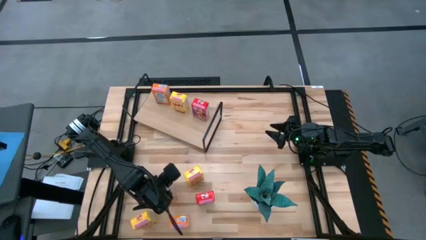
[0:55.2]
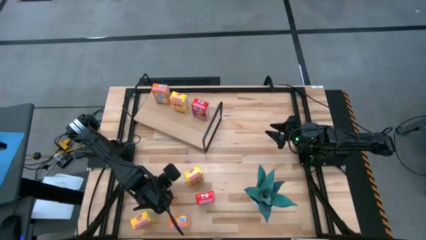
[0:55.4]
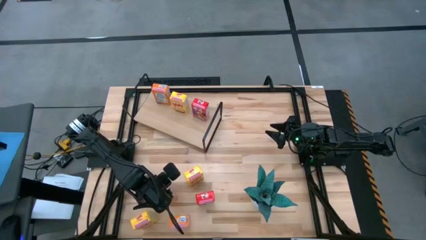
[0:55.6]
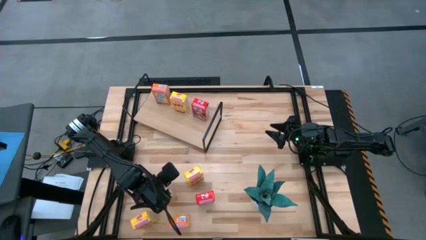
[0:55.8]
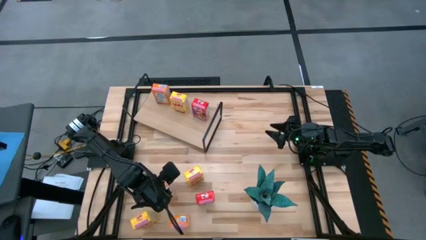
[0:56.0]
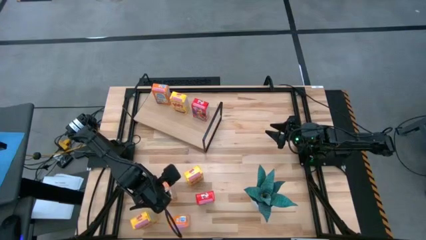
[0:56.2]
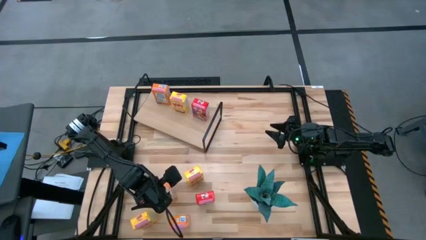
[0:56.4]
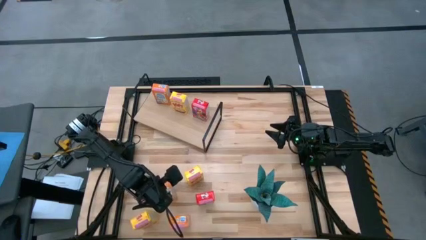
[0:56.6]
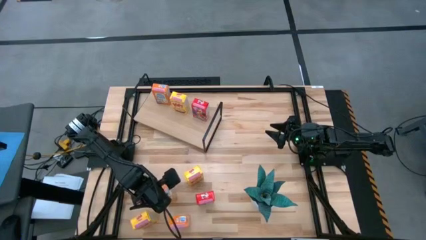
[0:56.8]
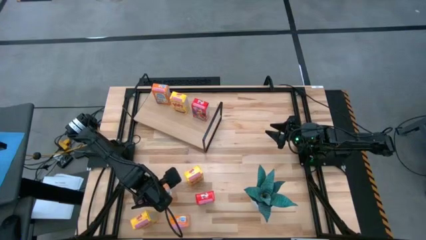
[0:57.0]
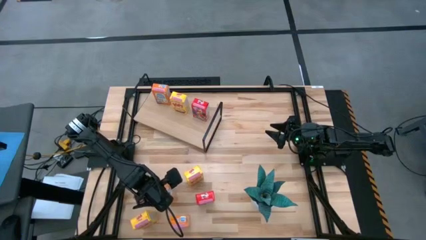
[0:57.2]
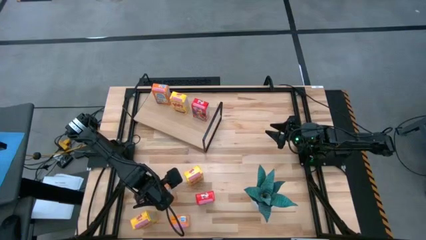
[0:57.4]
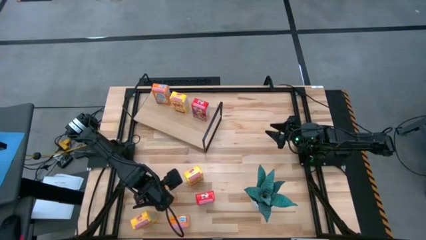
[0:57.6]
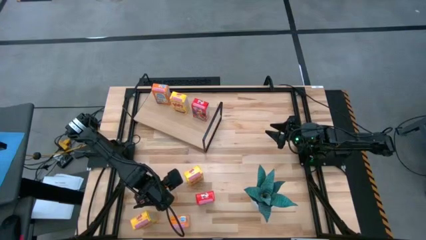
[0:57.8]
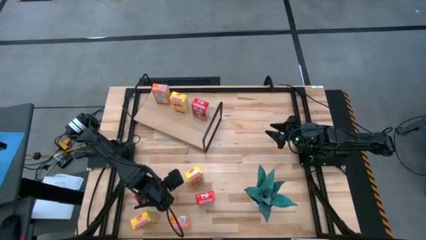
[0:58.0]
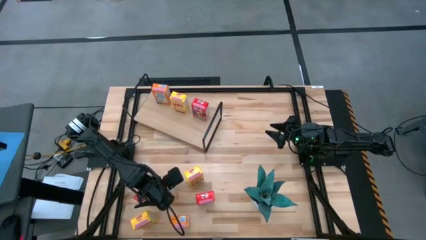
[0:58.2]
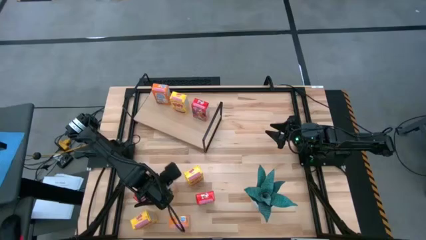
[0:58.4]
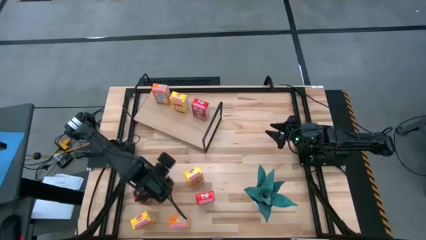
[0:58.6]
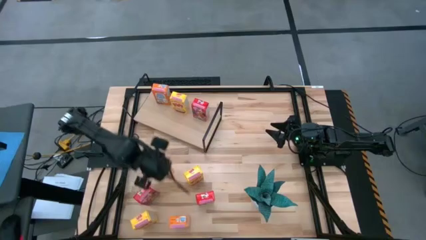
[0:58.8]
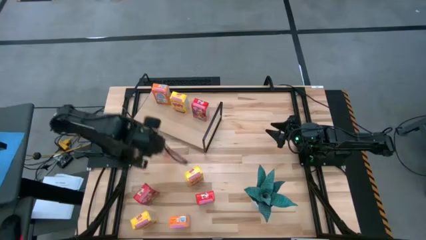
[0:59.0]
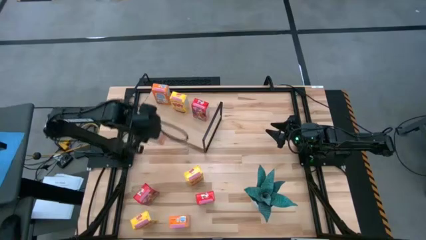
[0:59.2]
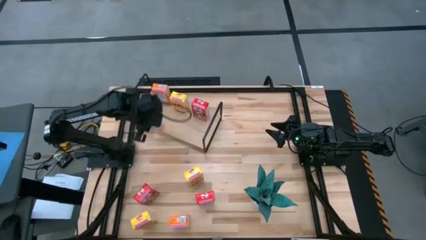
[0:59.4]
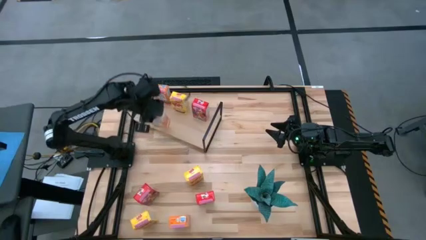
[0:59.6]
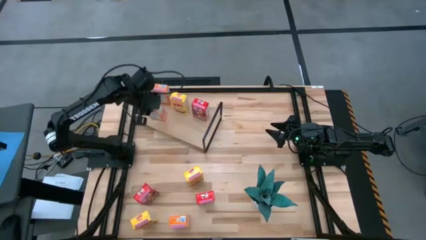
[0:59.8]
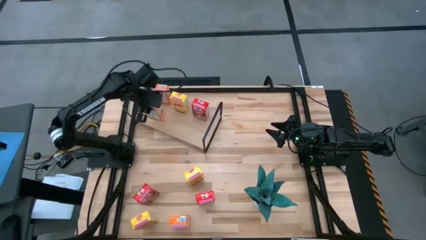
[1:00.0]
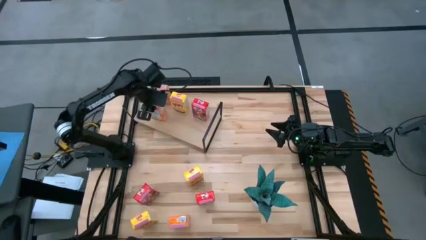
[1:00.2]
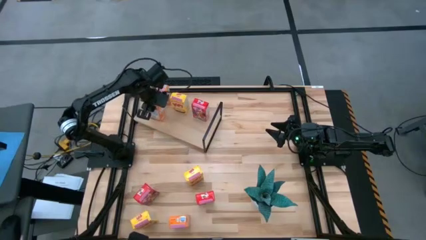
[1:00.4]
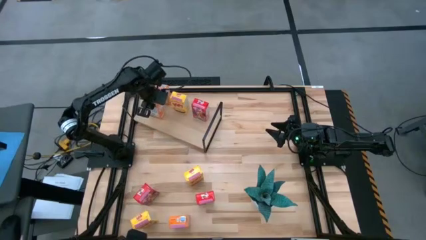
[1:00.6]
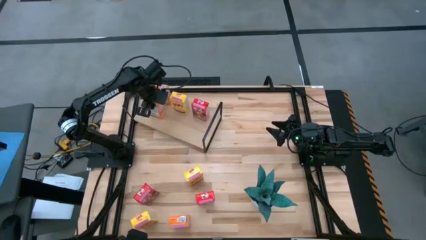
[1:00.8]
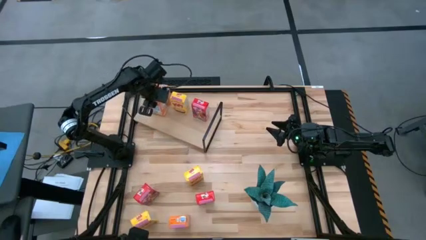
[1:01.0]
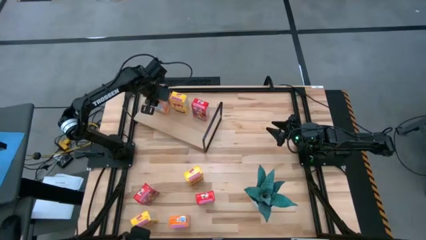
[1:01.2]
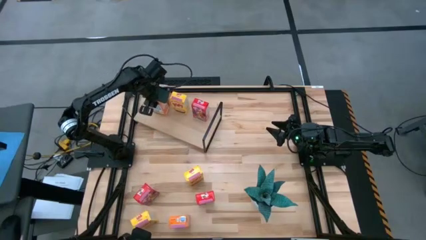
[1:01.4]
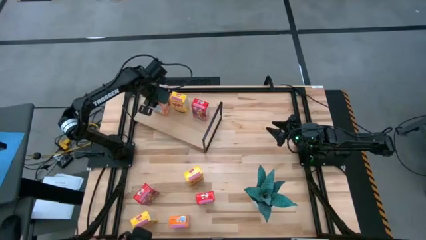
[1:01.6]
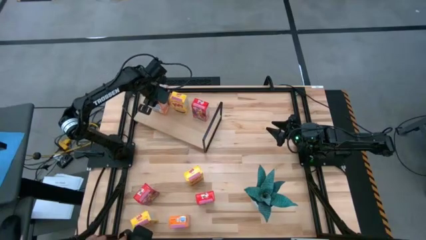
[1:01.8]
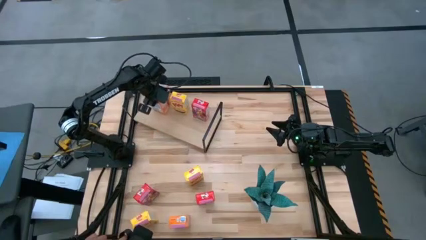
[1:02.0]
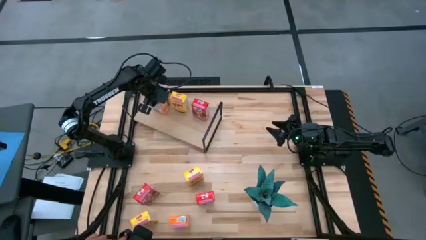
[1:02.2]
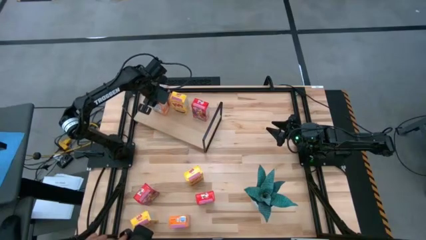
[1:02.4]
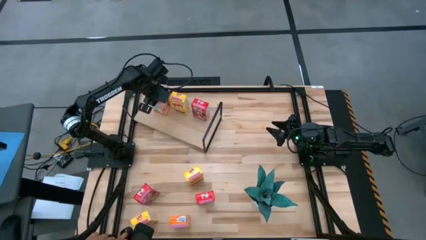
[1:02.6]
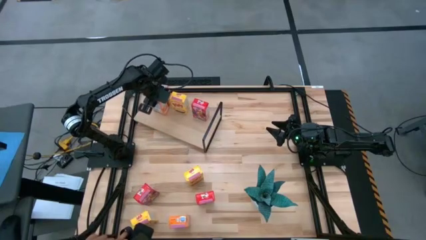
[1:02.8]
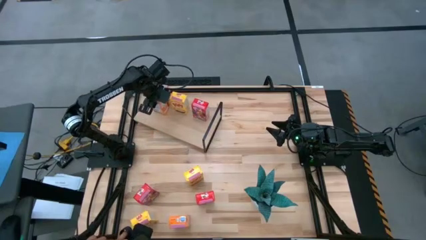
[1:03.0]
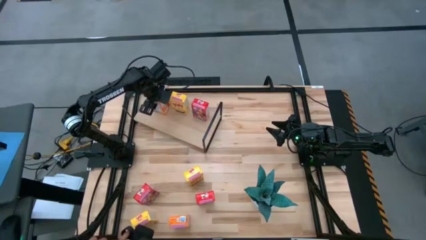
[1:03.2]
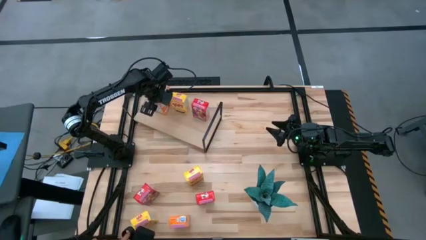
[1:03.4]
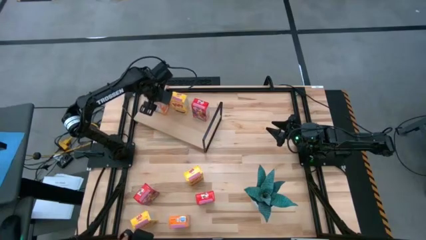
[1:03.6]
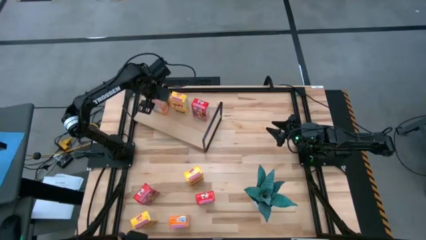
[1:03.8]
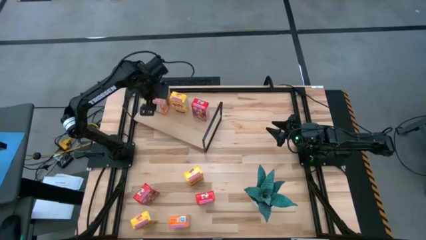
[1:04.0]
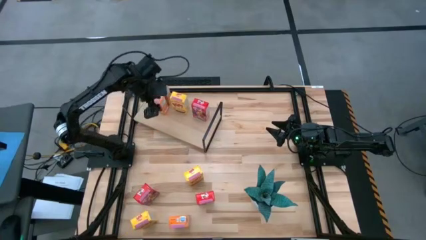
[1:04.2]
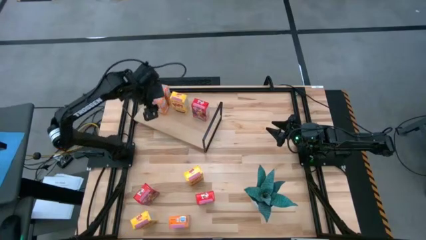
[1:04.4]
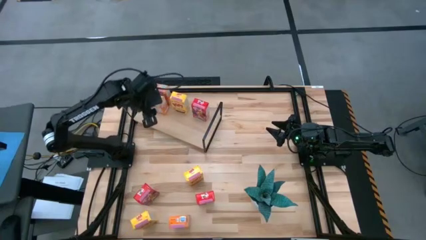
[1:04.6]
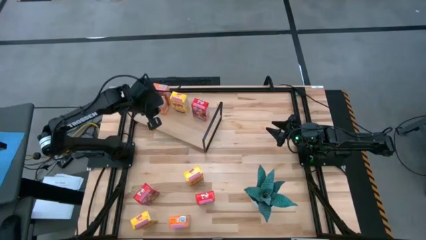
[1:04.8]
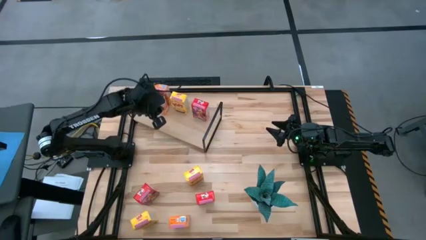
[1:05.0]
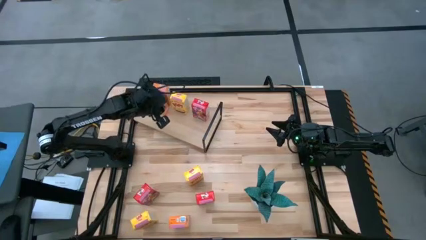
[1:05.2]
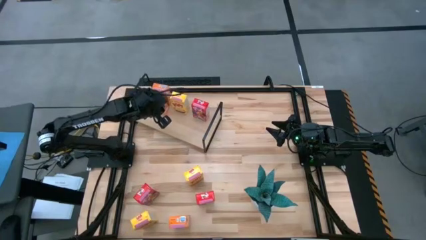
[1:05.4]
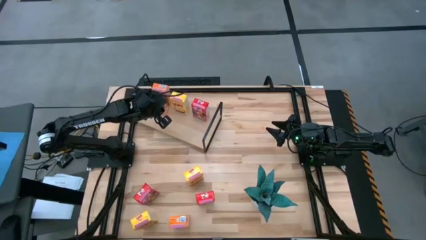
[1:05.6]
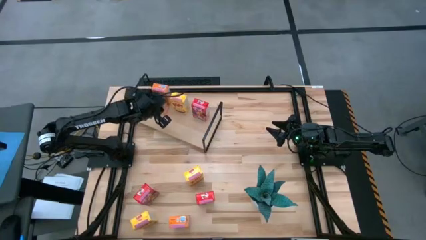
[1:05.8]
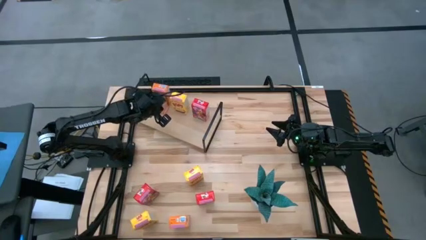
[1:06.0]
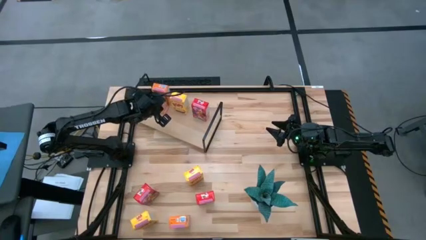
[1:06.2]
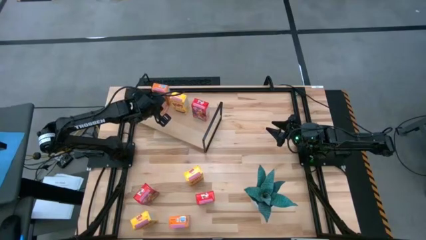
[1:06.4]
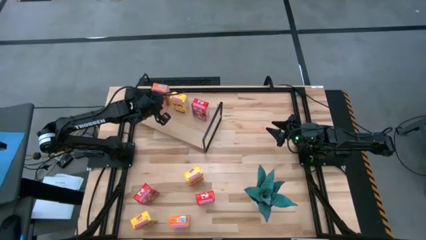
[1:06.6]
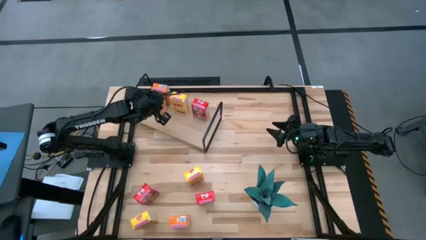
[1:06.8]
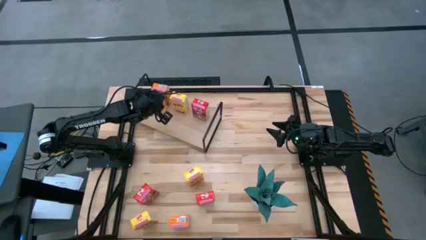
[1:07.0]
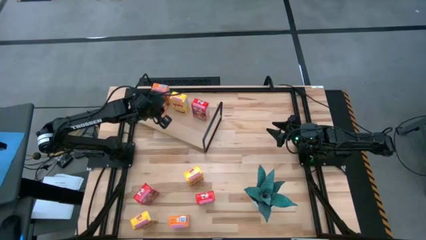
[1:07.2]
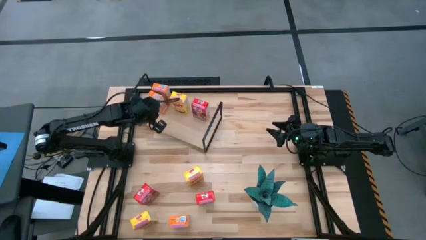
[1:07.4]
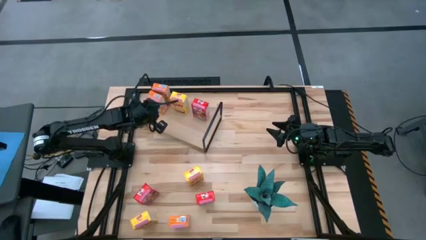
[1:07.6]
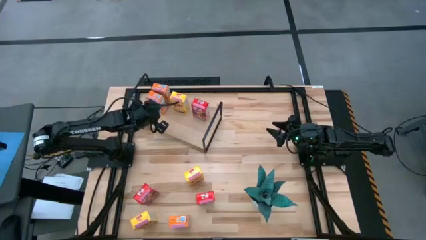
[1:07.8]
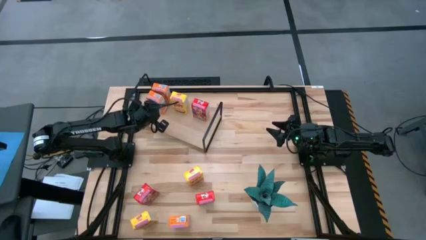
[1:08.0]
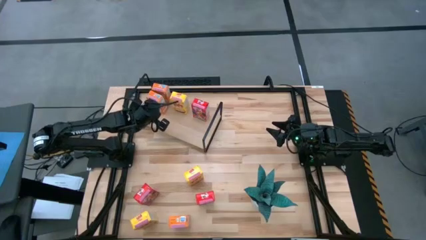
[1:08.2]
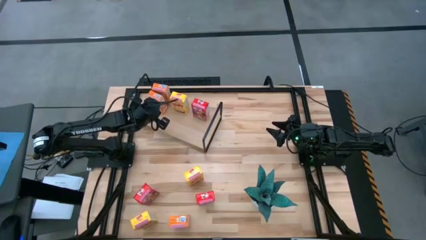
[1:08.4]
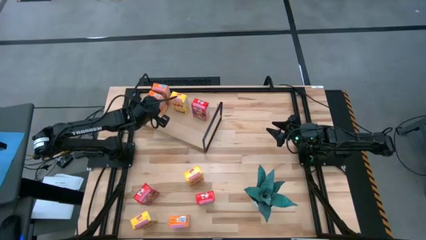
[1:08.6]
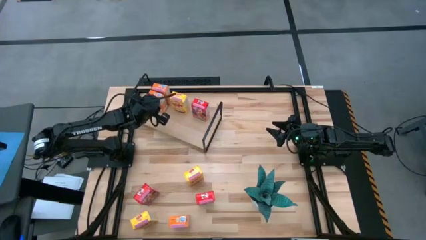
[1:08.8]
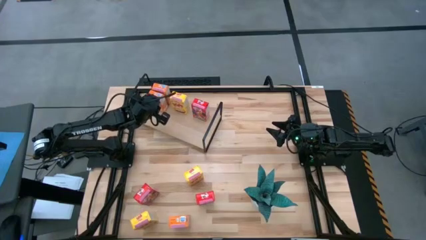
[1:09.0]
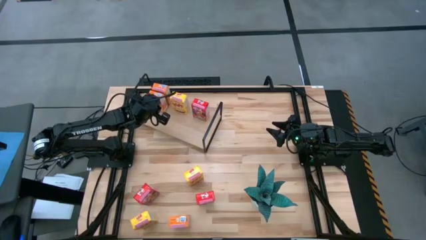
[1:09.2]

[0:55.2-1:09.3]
Task: Stack cereal on shelf
Put the top orange cereal box aligned with the other orange cereal box on the shelf

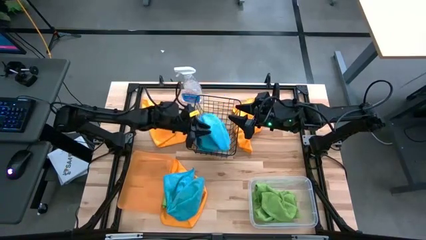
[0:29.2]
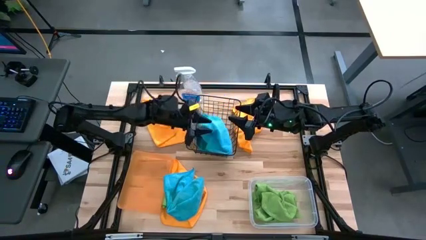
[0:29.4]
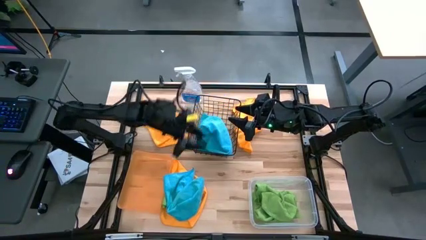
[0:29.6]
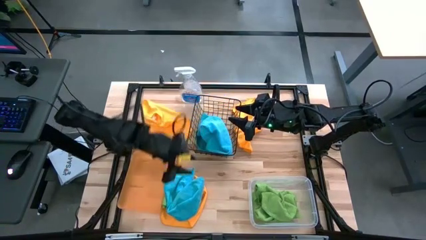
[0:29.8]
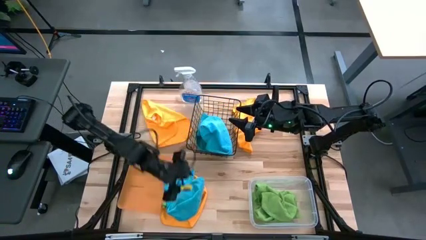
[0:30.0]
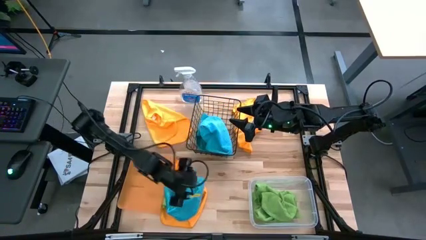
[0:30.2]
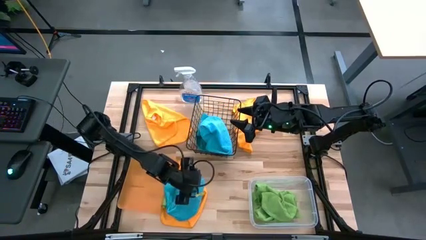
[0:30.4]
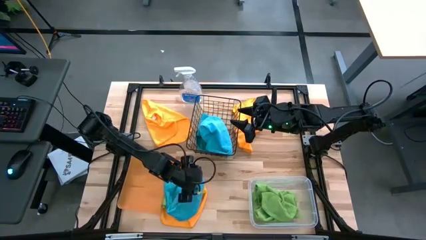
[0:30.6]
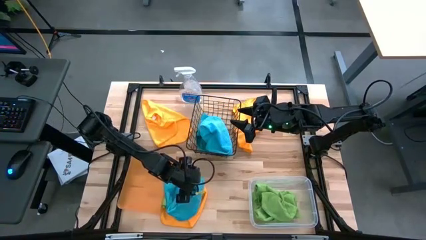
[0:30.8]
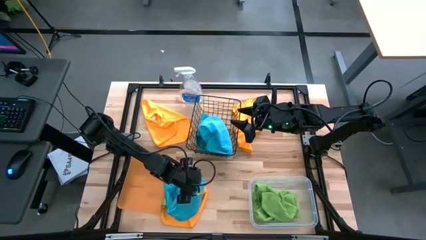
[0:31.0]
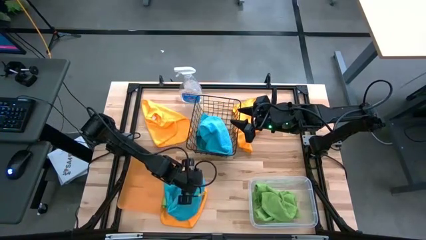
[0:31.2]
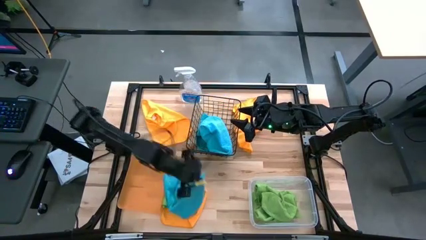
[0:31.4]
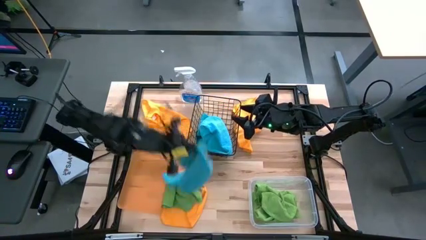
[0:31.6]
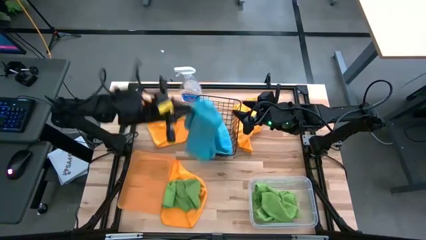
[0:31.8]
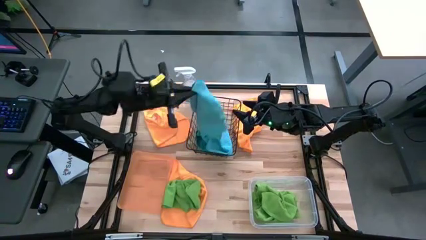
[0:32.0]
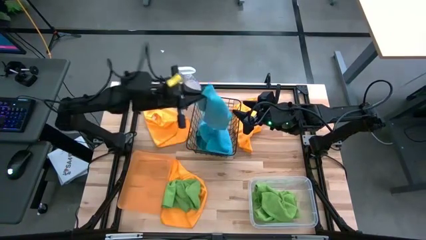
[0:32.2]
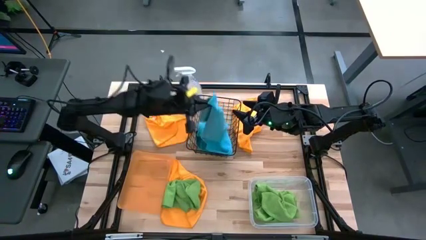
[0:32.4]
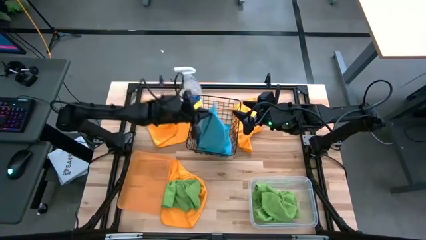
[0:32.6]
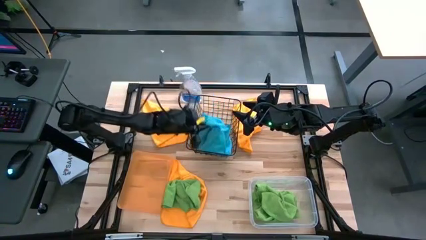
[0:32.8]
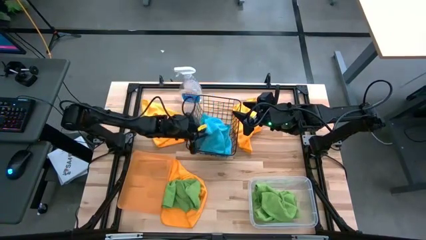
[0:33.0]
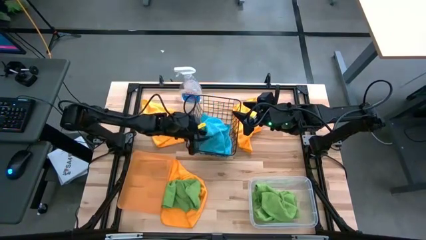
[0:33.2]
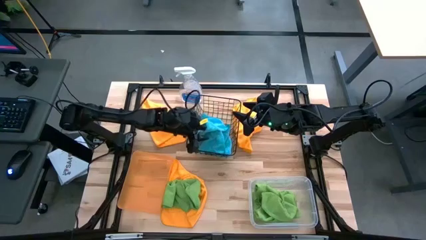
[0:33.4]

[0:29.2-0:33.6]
Task: Sort microfiber towel by color & place in baskets
Put the blue microfiber towel into the black wire basket
